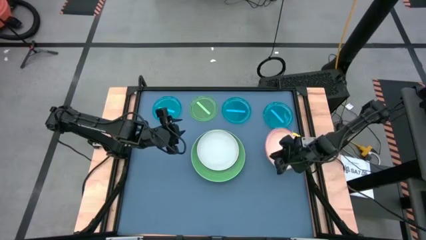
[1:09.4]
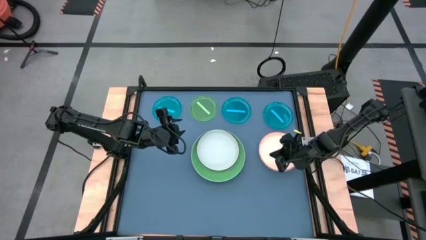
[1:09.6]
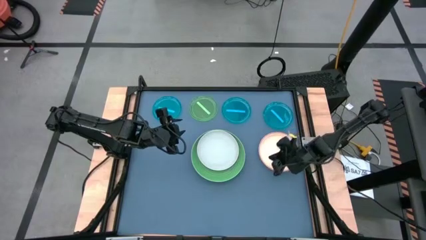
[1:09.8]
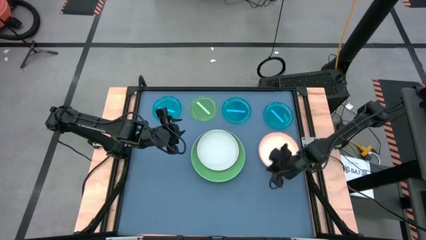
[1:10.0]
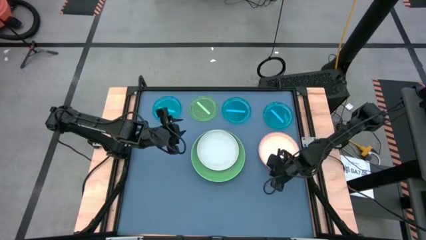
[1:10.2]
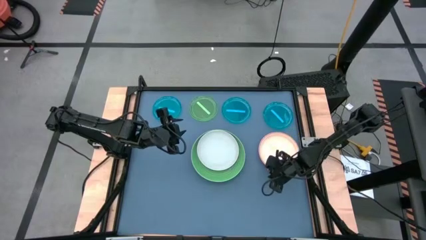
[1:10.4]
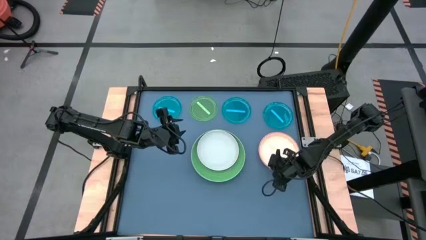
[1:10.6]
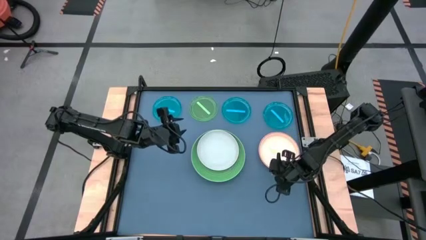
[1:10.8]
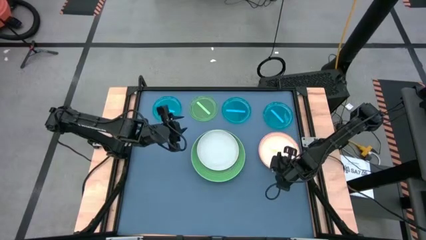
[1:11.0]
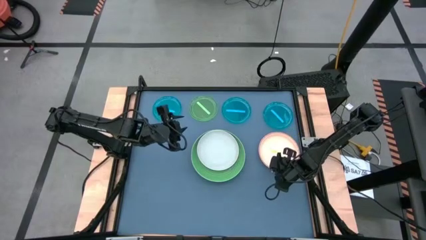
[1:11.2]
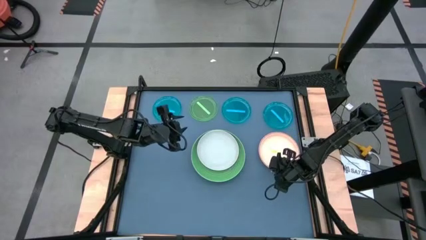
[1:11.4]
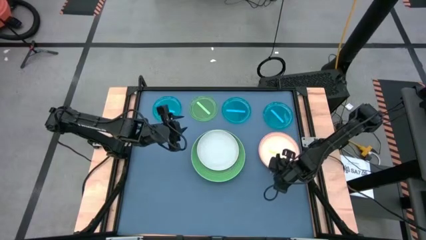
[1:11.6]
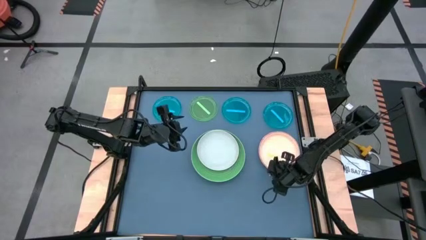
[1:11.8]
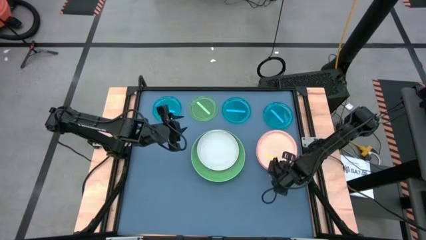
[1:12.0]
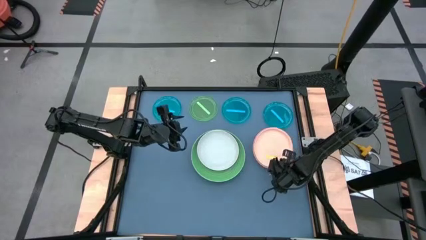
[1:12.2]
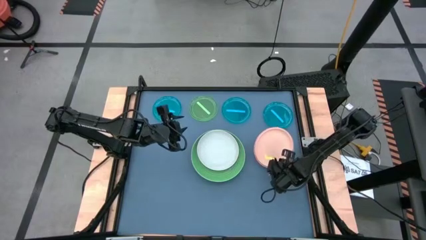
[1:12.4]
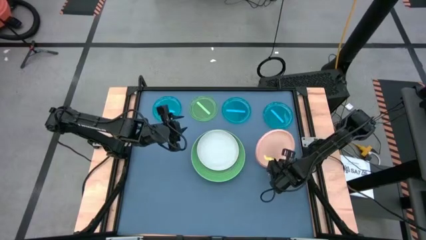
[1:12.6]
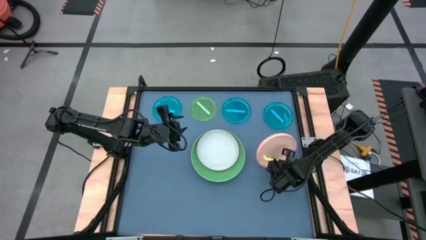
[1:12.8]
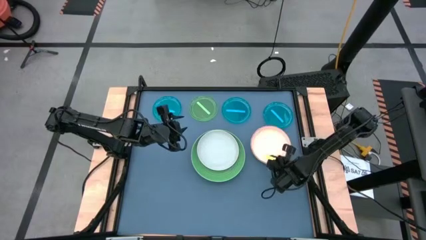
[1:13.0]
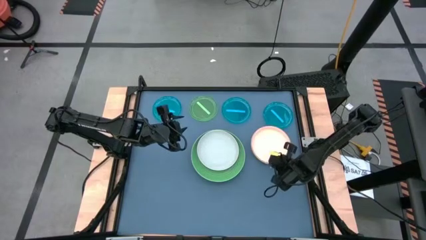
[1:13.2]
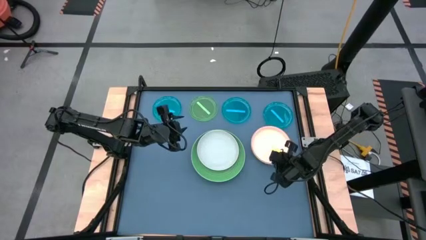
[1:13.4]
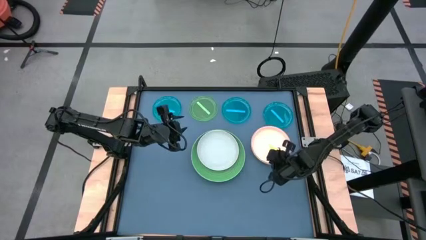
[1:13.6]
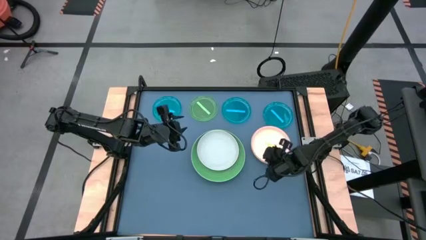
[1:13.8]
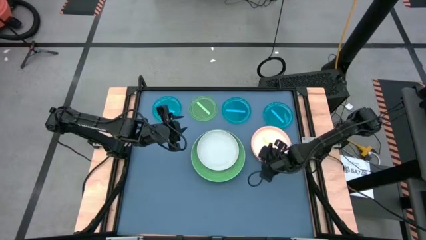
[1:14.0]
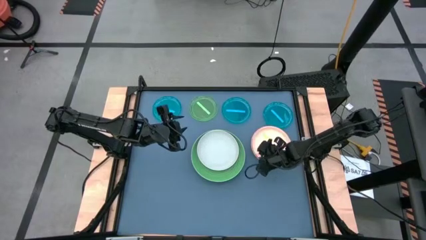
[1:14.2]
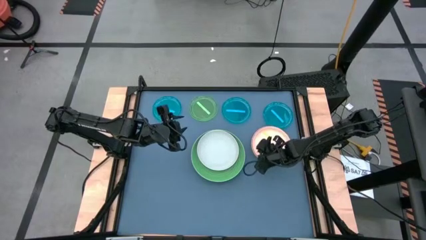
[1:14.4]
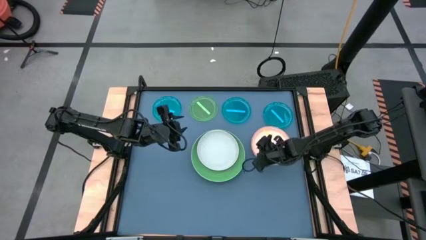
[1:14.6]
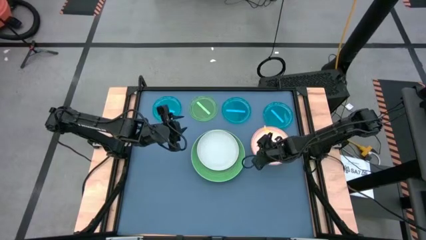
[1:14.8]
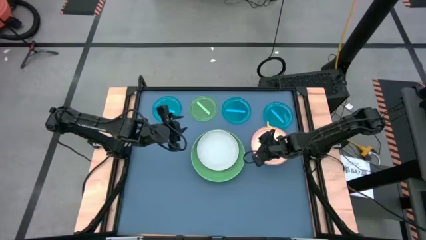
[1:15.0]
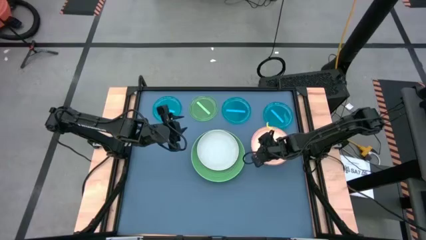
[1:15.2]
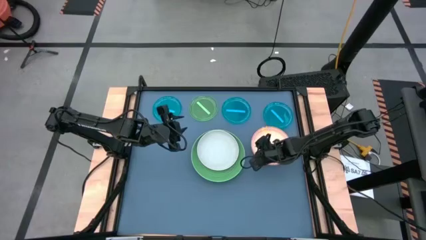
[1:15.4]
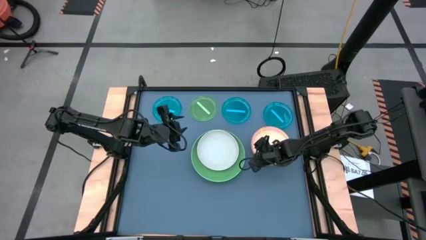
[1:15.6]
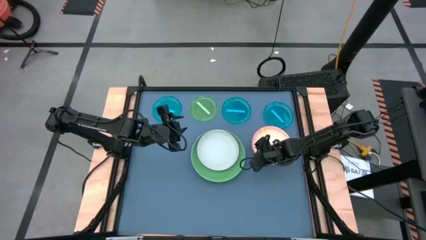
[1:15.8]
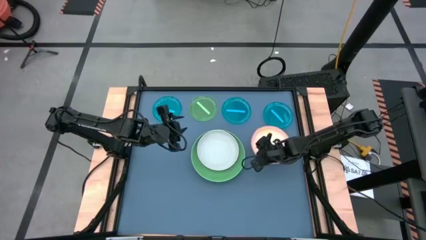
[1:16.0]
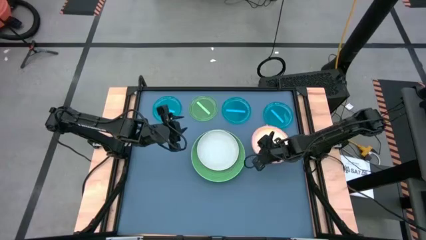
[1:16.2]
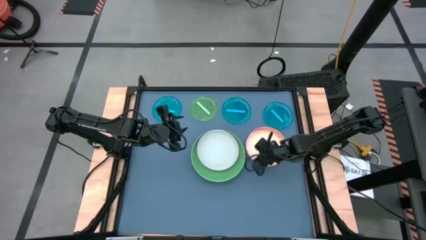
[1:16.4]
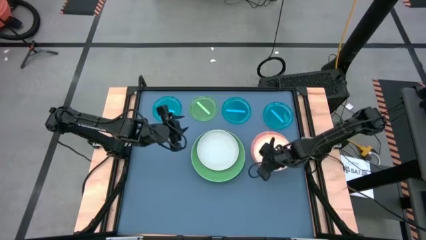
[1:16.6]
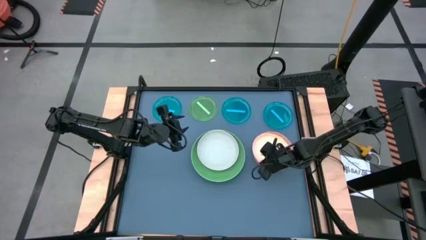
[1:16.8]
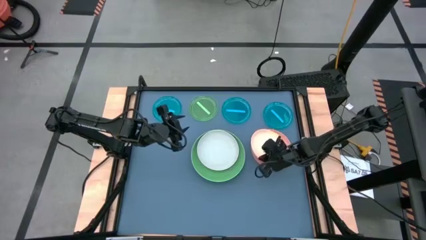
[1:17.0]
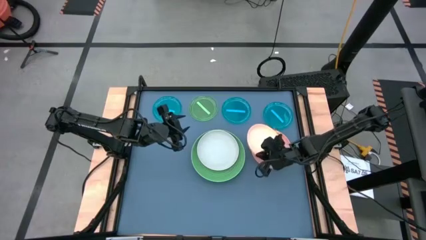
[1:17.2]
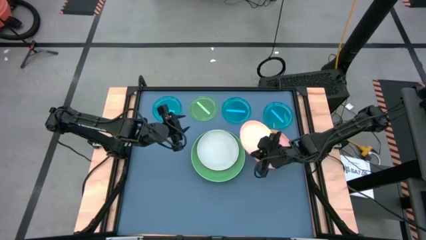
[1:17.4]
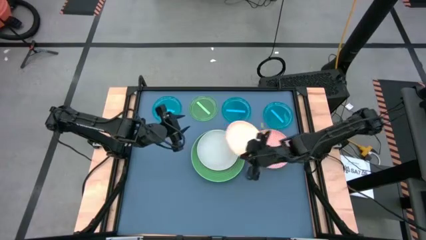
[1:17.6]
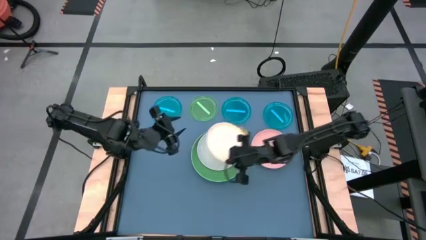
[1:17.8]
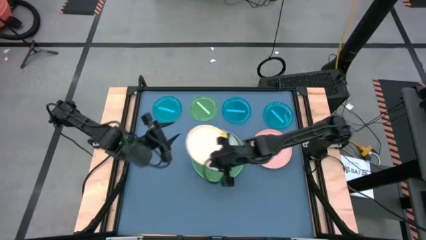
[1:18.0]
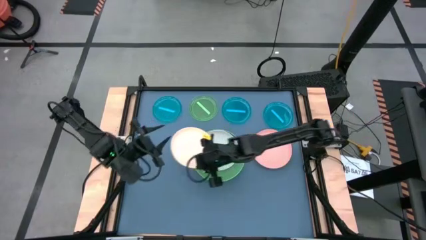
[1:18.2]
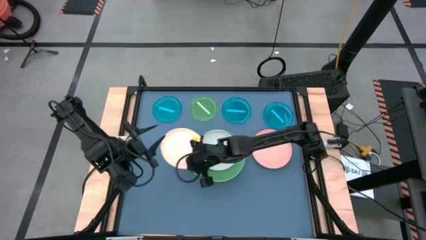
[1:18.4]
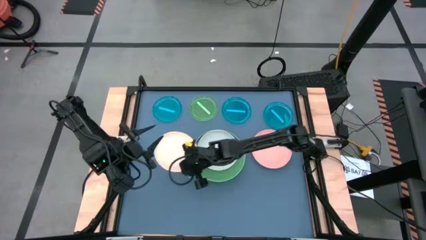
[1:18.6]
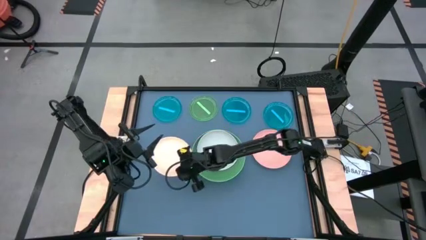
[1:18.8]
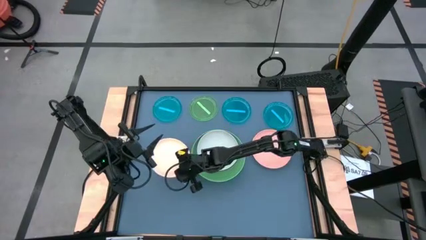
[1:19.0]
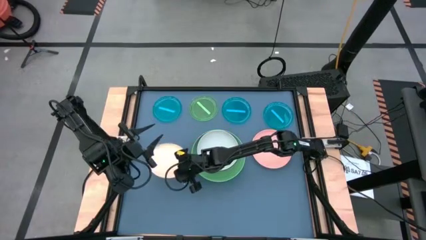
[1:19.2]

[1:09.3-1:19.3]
Task: Stack plastic plates
Remove the light orange plate from the orange plate to the middle left of the table

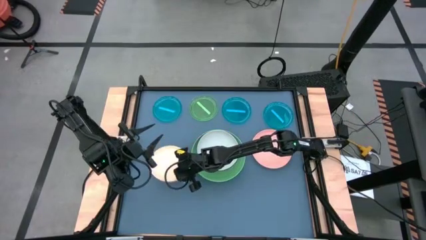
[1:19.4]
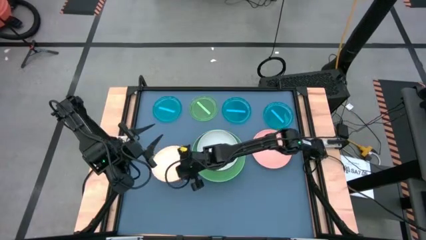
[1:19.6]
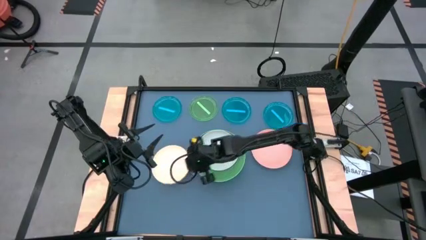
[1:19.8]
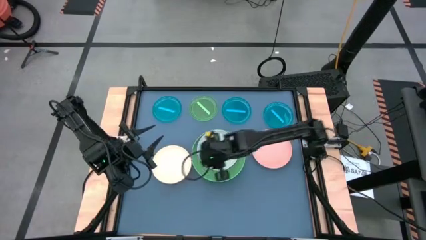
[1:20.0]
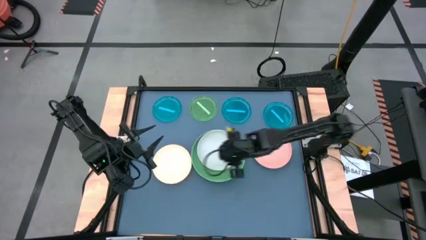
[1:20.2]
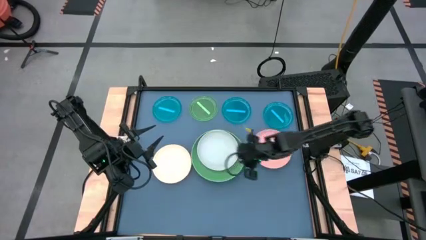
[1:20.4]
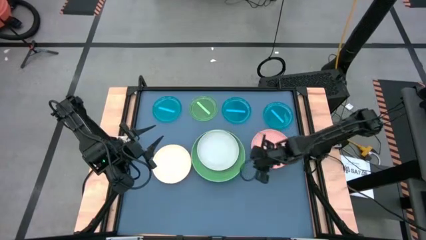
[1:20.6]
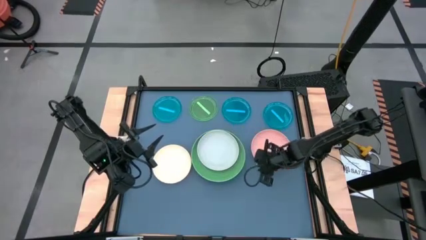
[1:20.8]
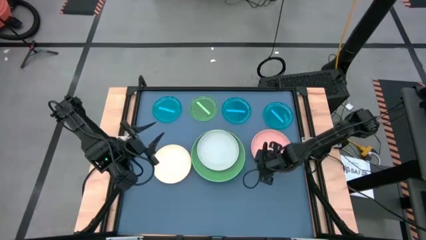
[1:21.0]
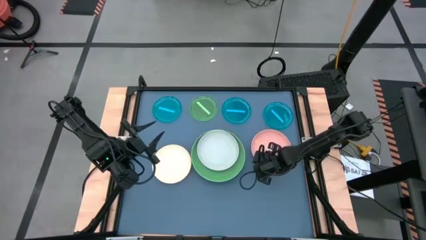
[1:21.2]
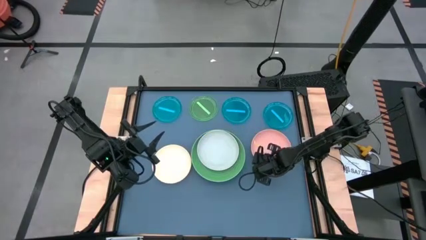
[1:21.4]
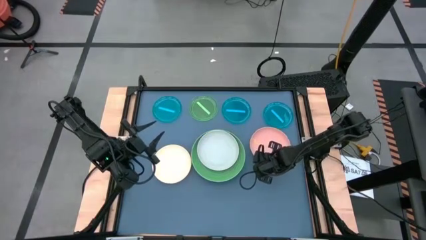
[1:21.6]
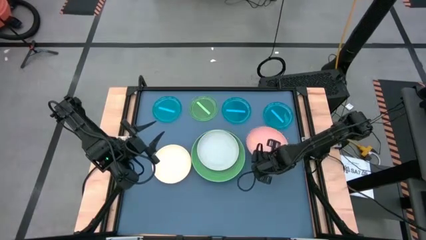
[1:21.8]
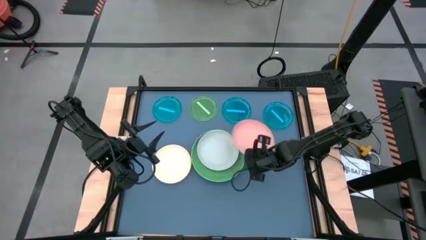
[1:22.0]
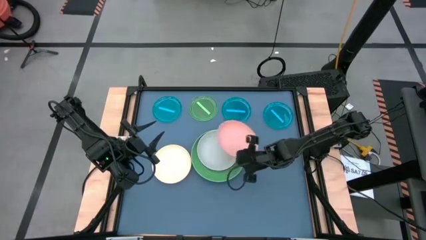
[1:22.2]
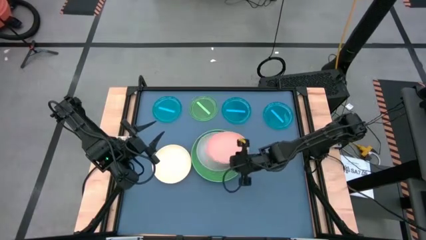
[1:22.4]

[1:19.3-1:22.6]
Stack the orange plate on the gray plate

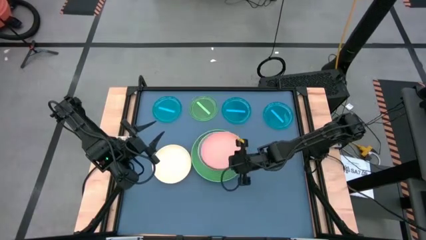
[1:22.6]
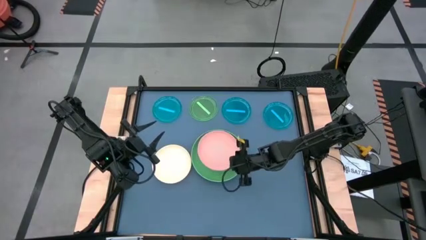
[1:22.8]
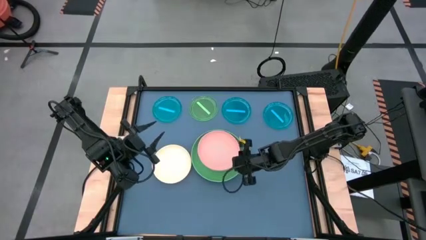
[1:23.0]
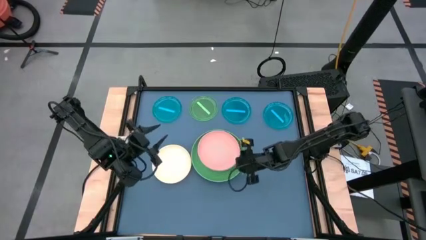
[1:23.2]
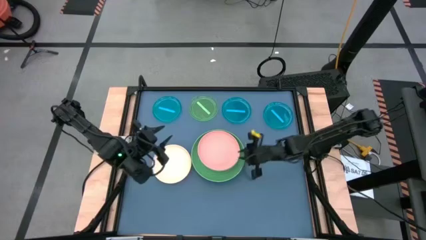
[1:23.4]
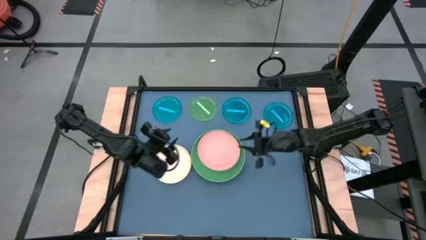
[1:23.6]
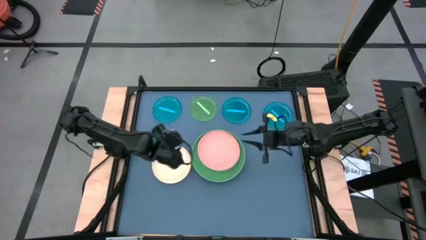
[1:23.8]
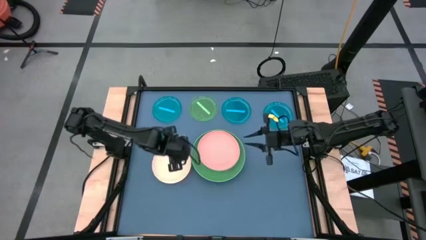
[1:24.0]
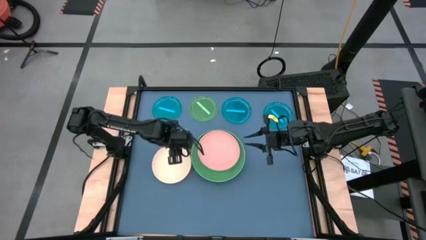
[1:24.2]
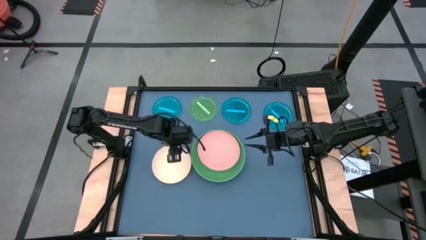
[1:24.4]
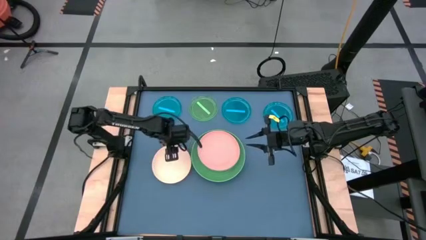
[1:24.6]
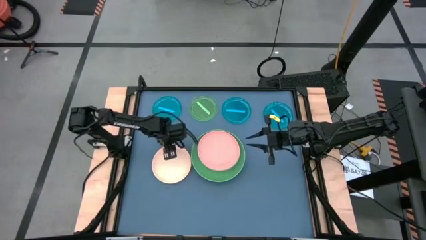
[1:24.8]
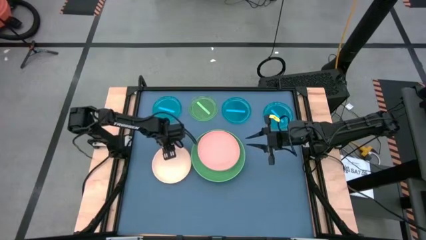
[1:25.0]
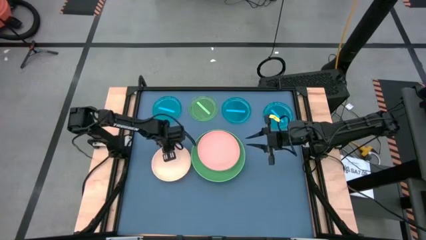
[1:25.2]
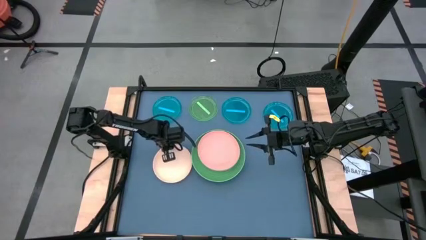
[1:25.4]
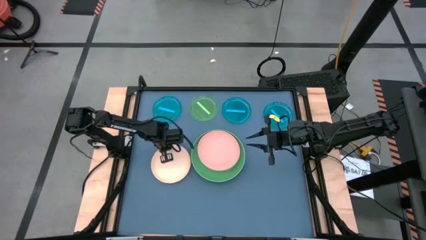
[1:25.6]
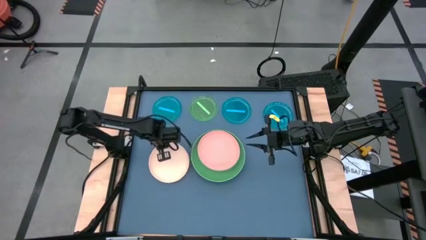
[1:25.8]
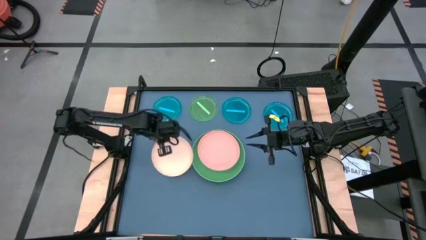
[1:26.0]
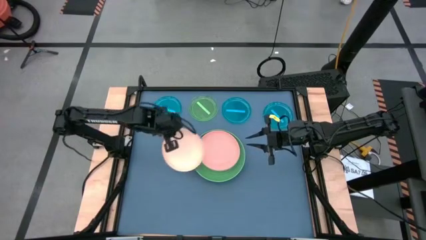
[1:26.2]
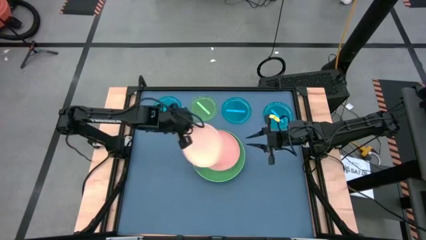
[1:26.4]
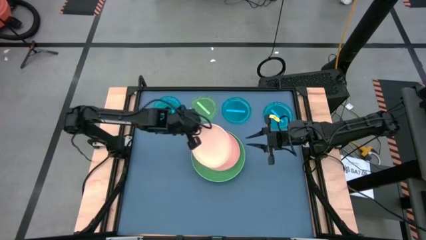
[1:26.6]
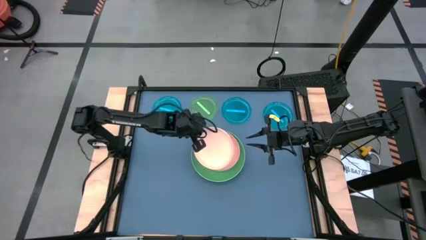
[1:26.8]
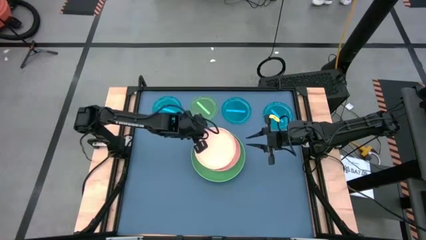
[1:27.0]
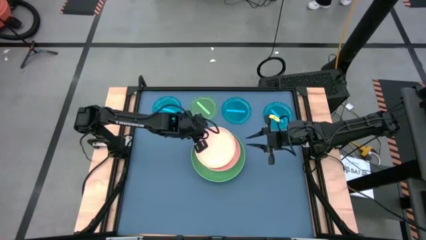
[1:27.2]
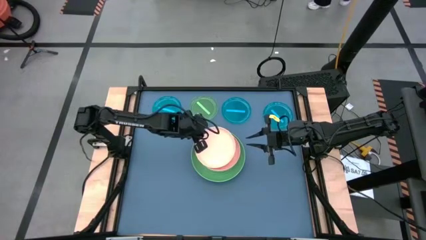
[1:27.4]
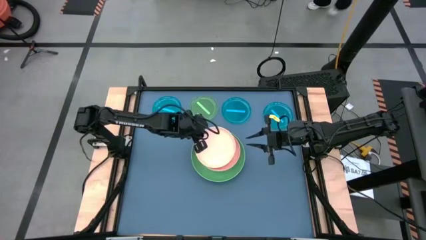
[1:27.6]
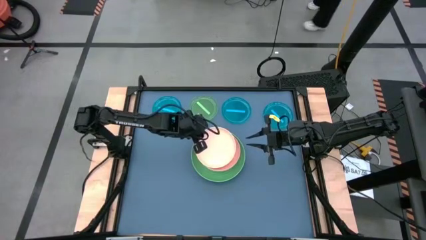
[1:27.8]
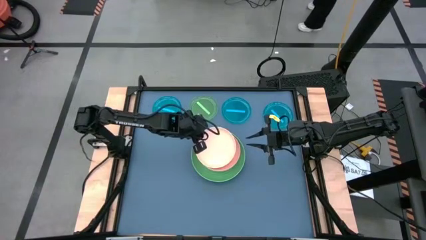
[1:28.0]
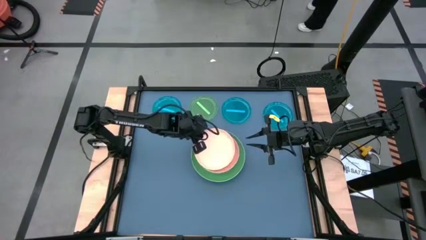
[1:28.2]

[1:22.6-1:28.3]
Stack the light orange plate on the orange plate
